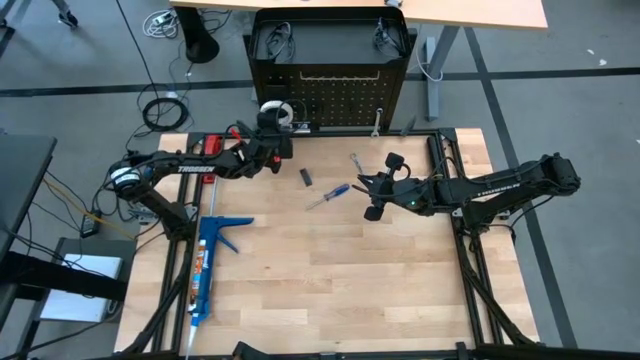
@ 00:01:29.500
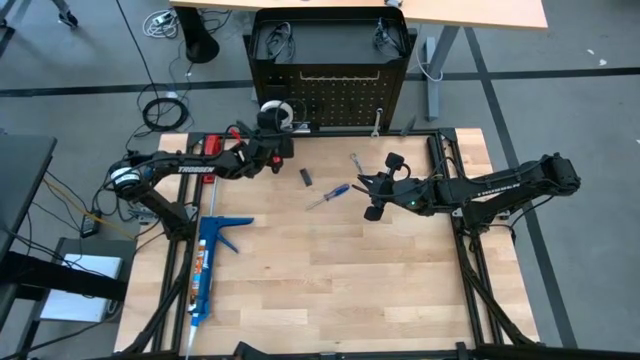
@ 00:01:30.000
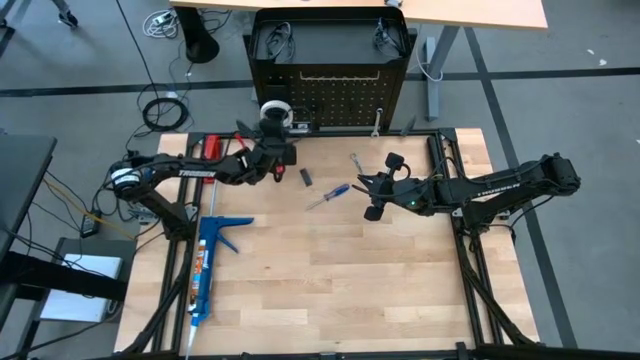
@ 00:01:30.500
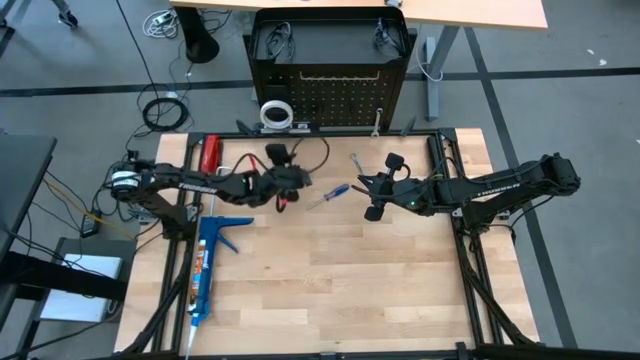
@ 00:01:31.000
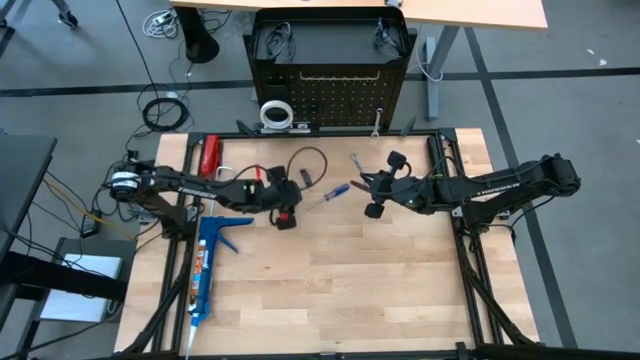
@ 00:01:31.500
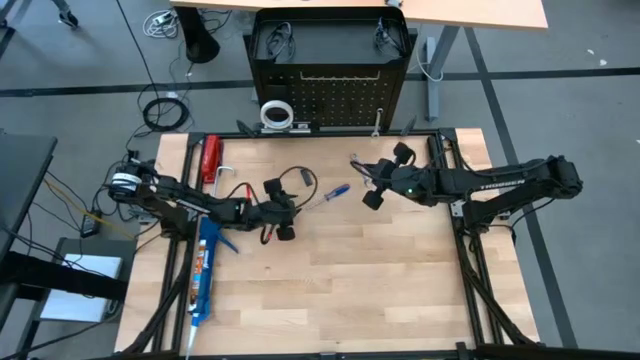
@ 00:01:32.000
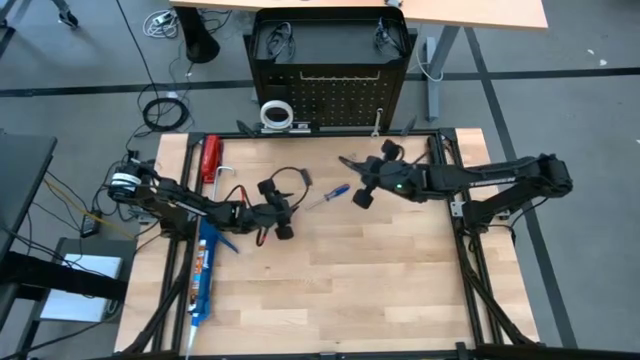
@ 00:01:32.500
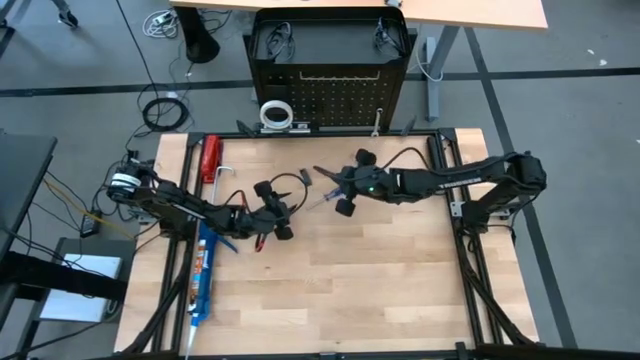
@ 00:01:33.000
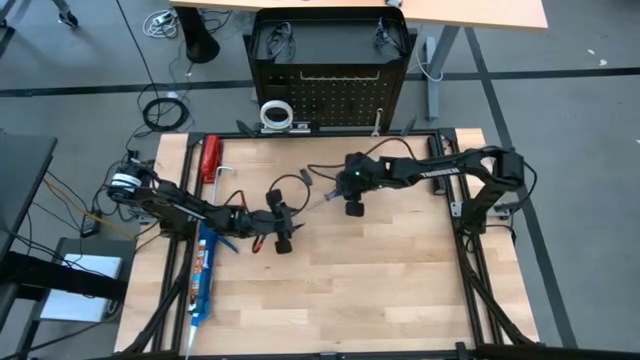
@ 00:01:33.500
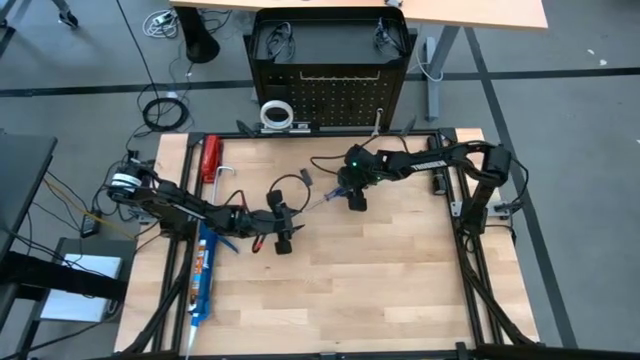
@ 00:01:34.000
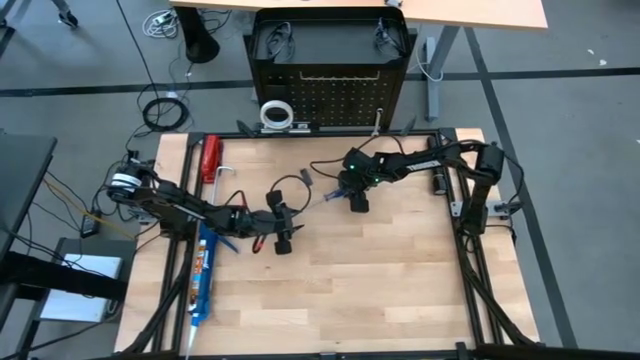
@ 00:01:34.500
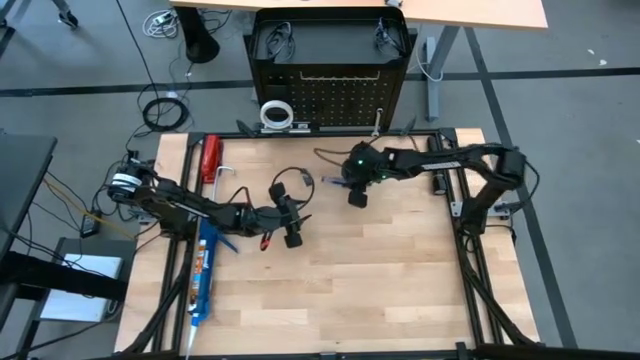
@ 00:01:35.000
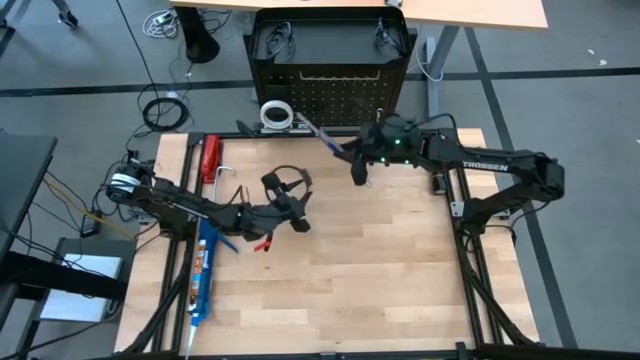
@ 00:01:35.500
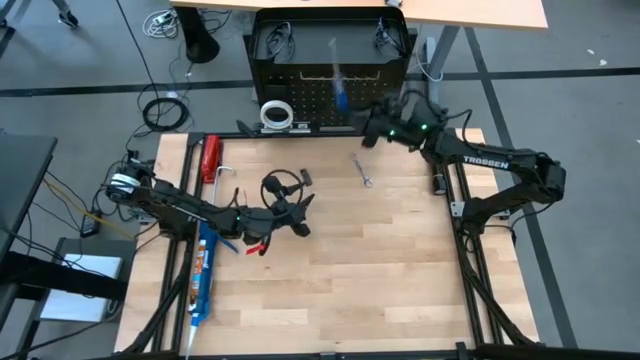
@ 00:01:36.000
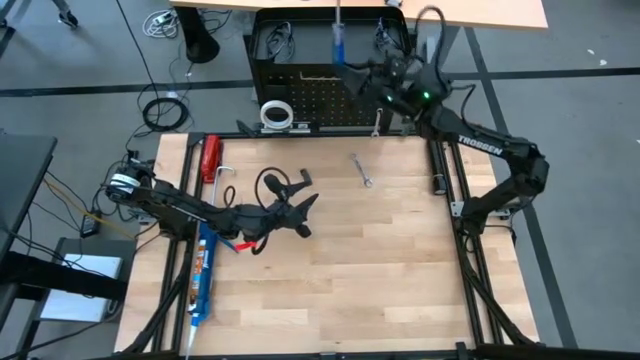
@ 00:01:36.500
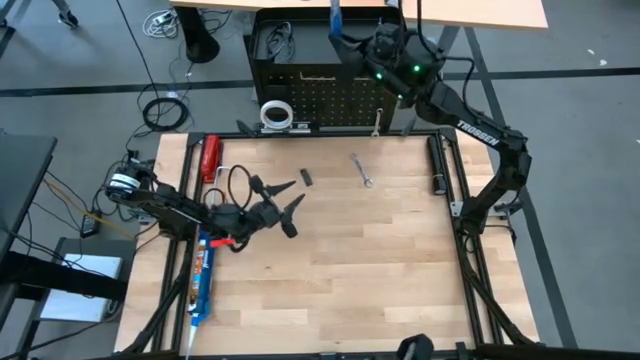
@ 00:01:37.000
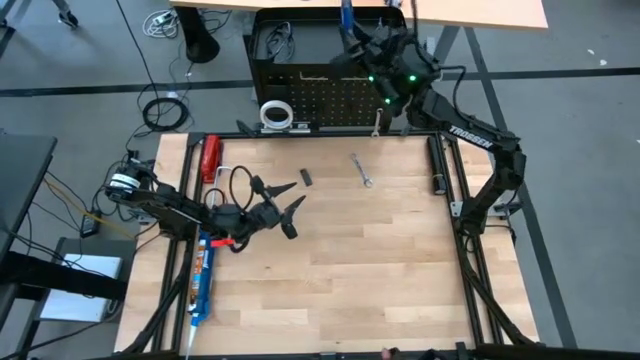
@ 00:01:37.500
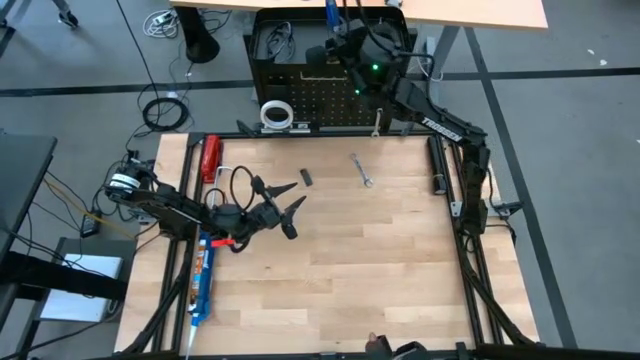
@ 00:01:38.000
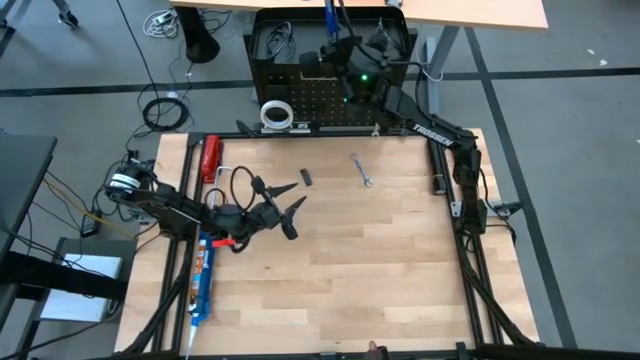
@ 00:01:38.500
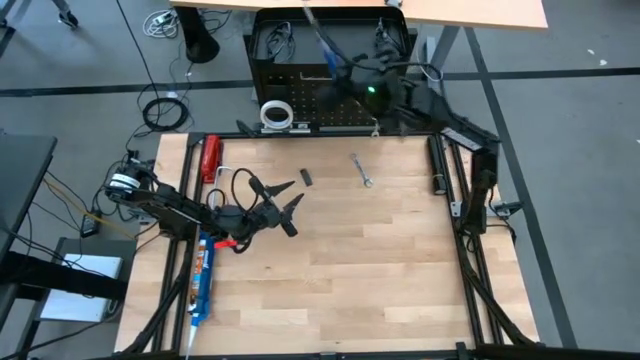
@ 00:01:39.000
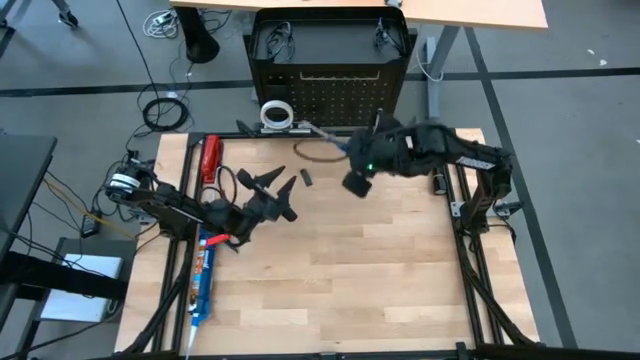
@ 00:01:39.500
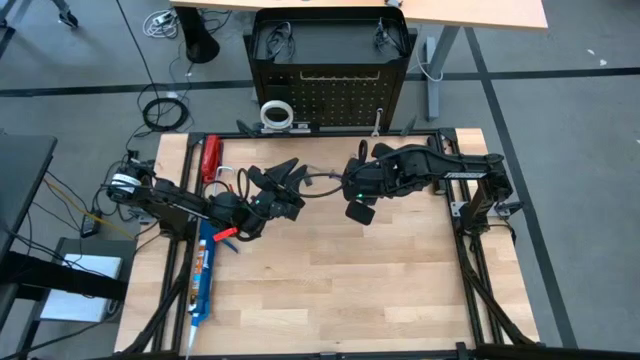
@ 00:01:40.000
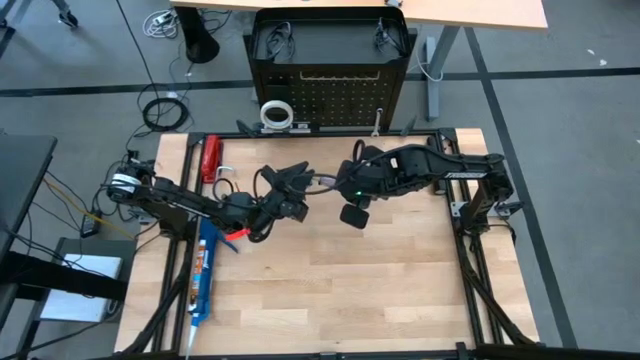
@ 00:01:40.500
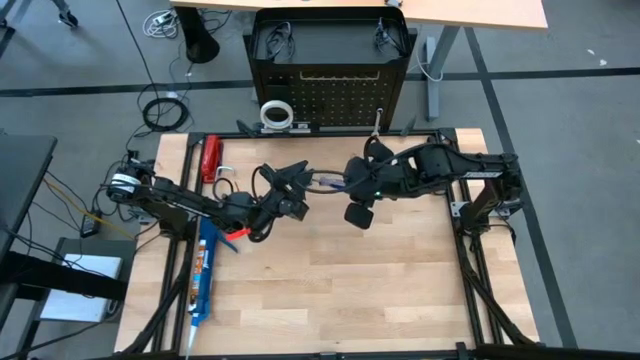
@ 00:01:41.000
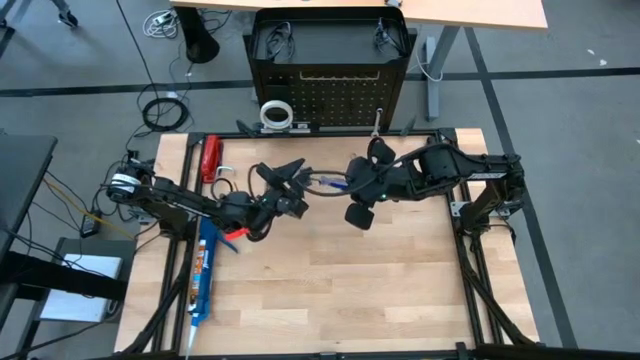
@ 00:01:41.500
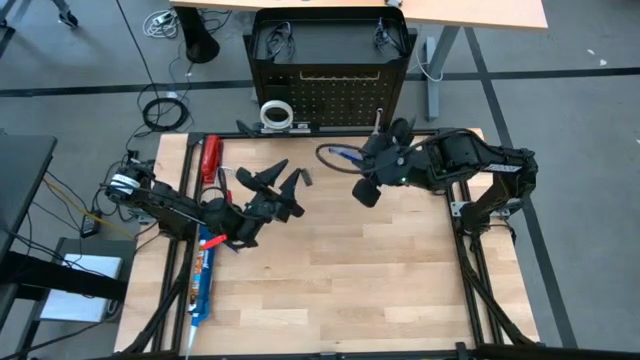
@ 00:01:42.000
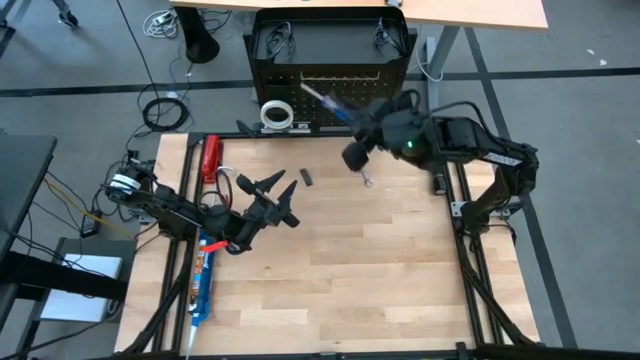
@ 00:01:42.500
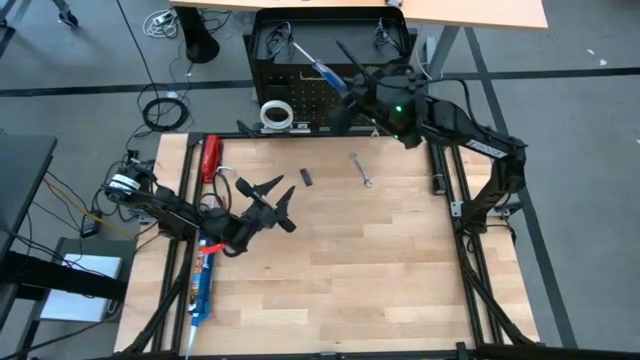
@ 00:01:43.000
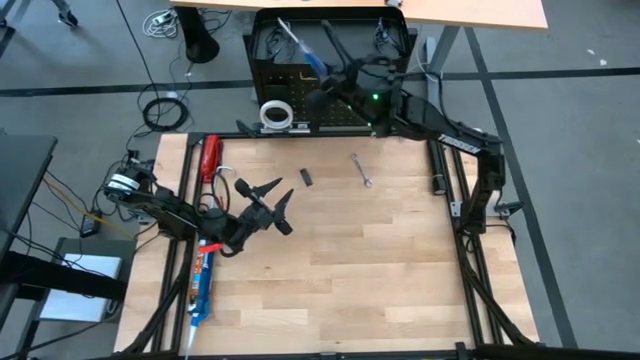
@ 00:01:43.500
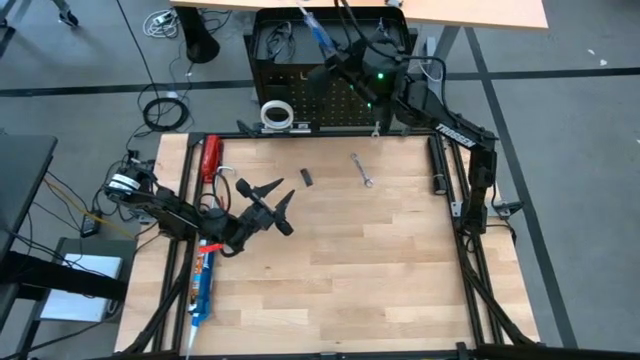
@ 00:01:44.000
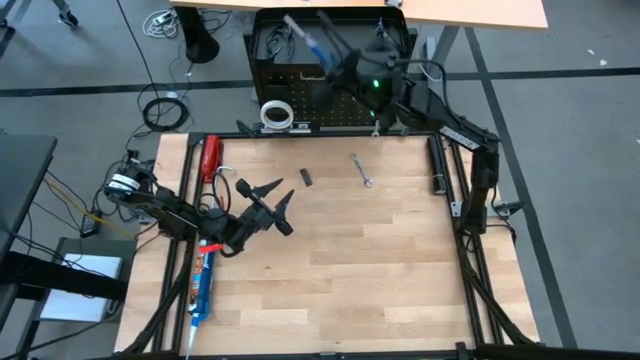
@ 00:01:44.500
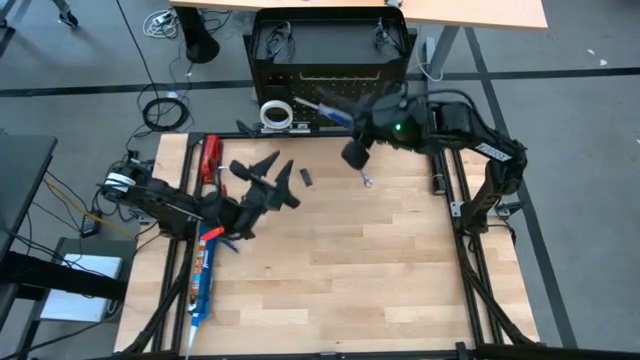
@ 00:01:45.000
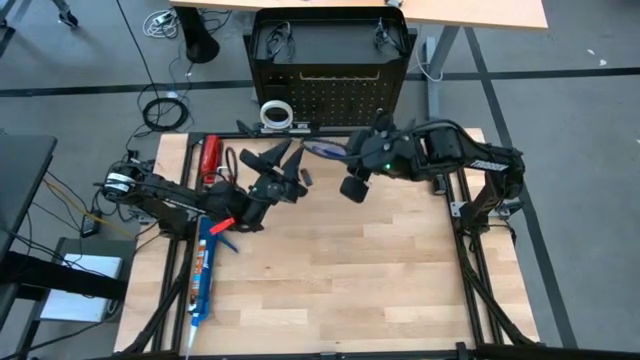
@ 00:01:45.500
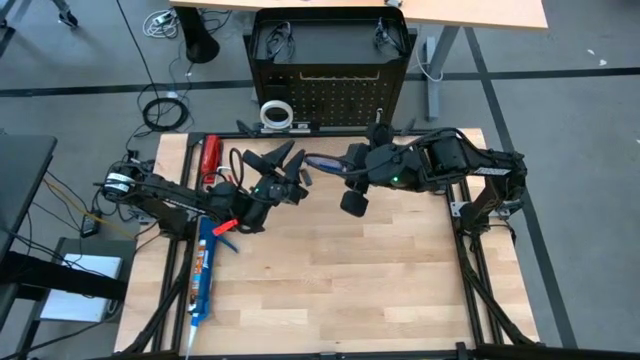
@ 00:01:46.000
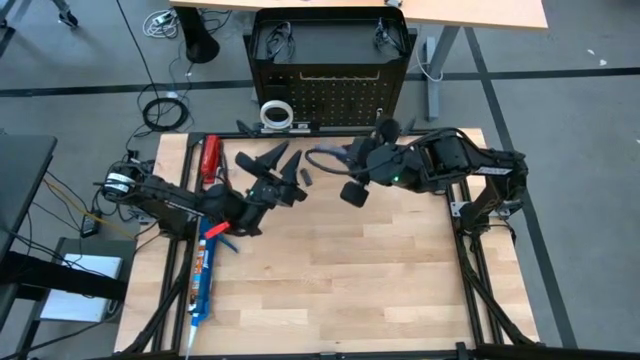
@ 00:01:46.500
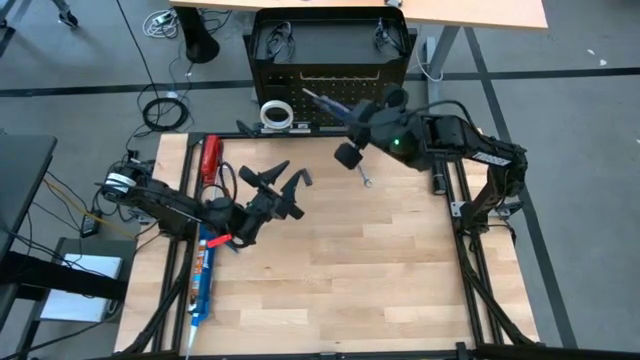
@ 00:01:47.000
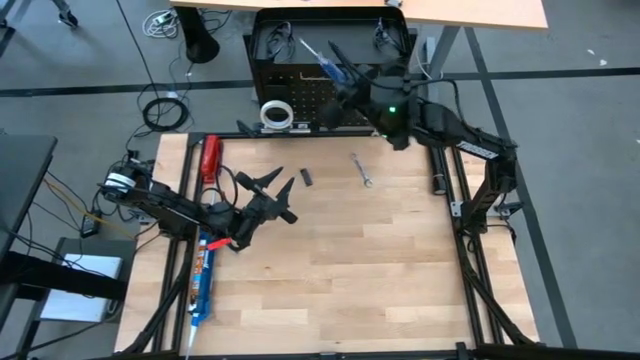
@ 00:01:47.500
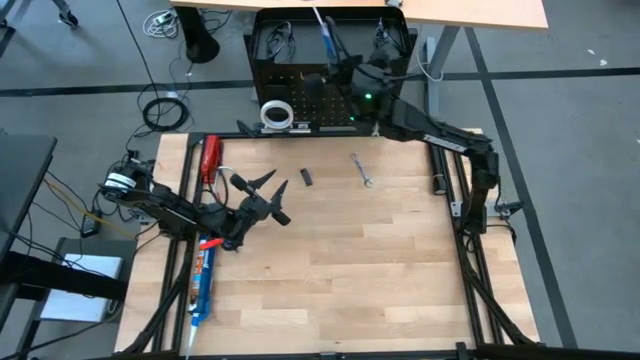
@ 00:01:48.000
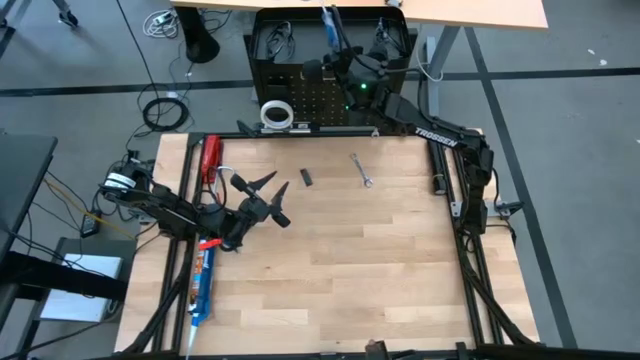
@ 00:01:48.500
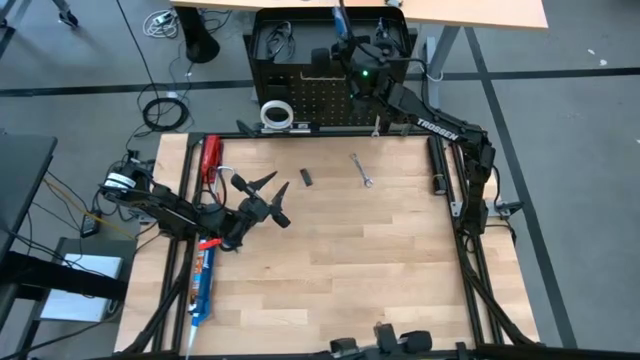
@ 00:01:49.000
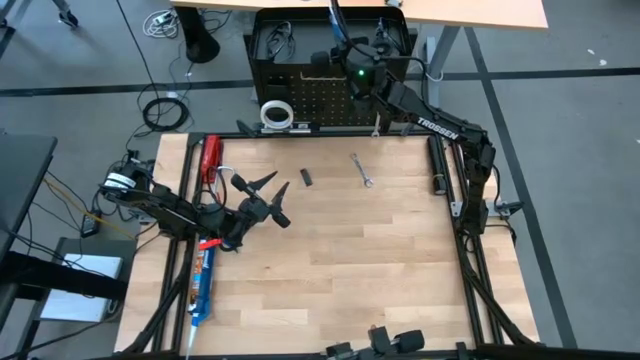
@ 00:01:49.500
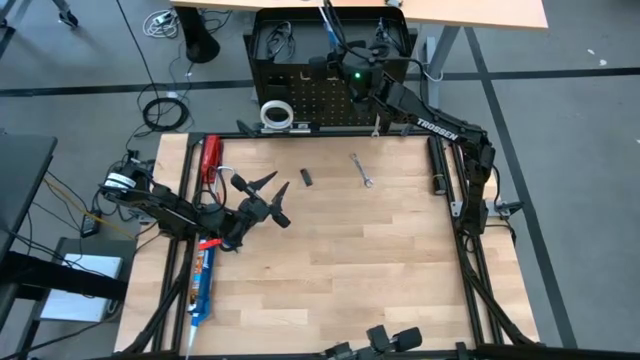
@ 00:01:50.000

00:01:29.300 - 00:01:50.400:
Task: Hang tools onto peg board
Put the blue screwdriver onto top of the black pegboard
